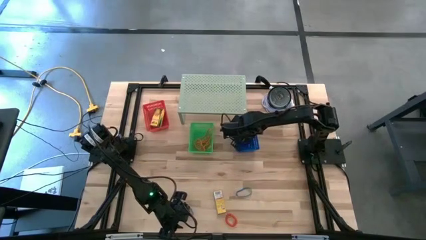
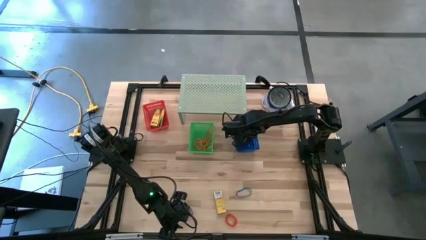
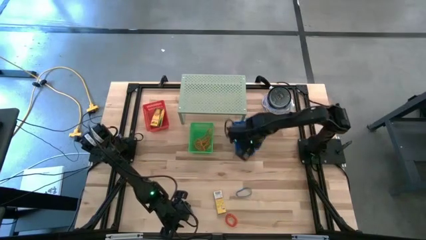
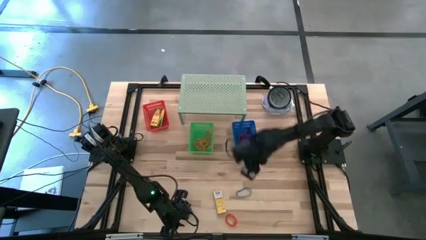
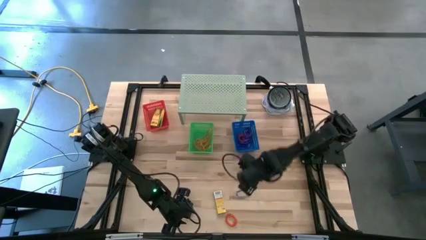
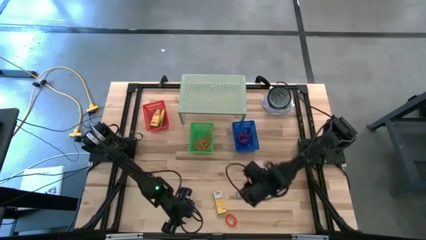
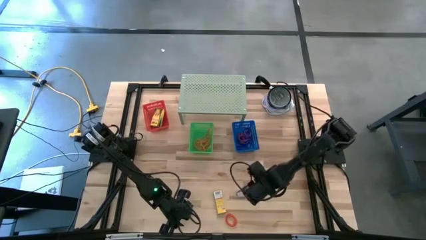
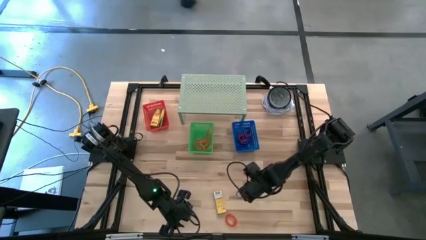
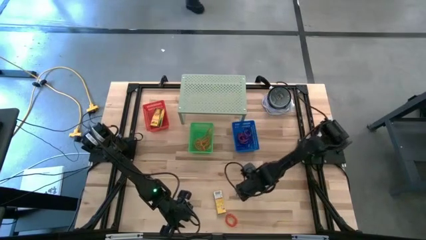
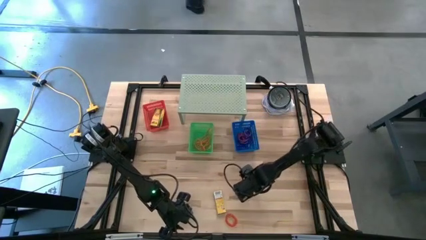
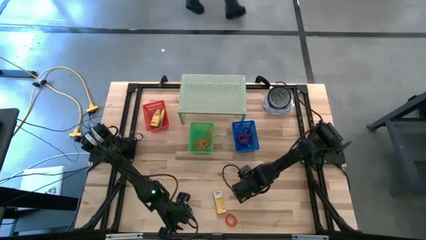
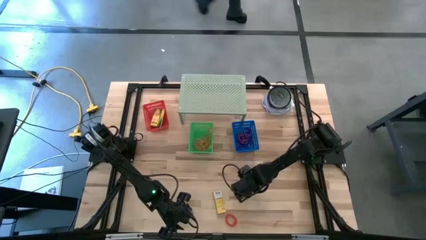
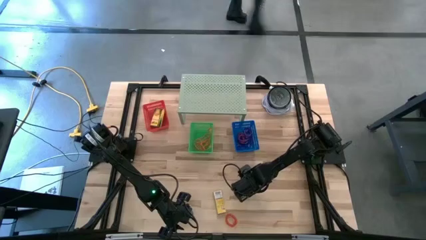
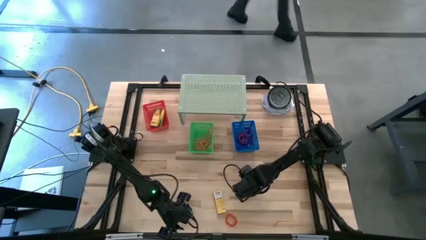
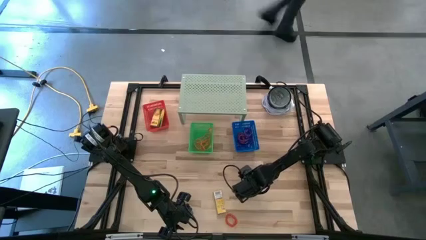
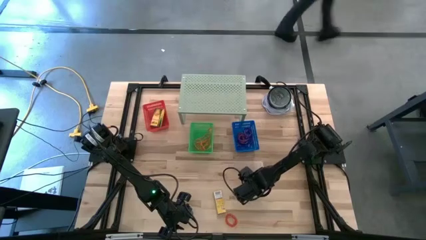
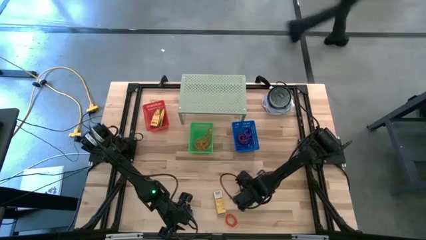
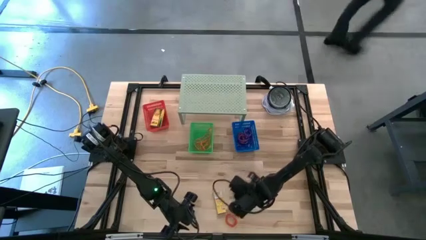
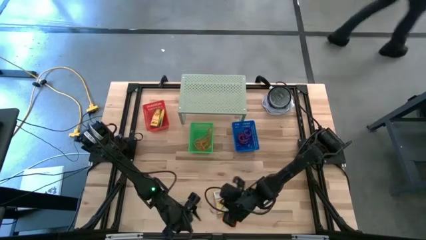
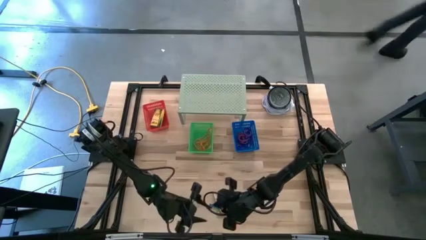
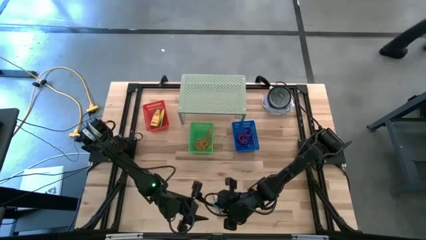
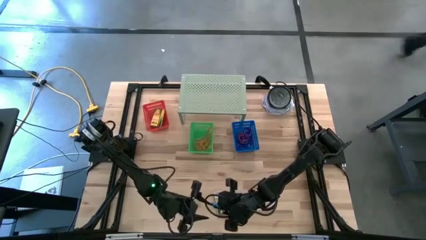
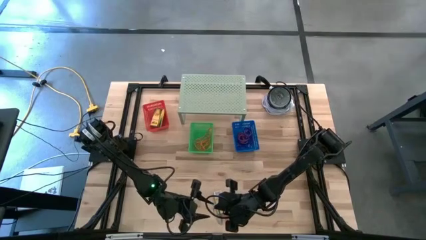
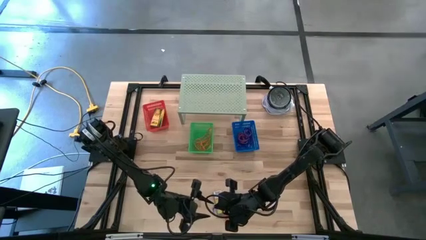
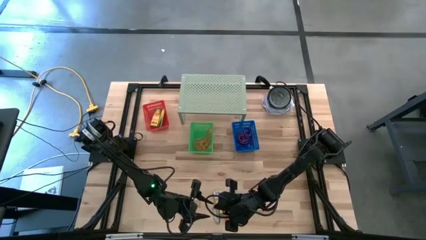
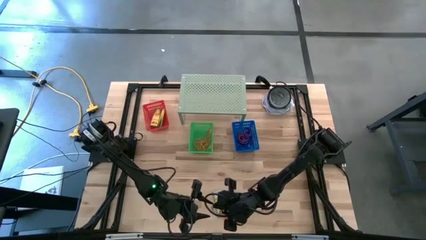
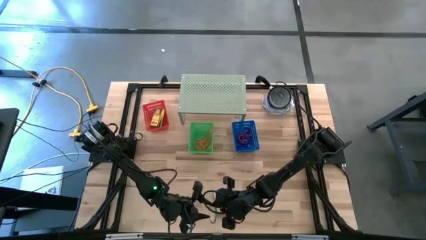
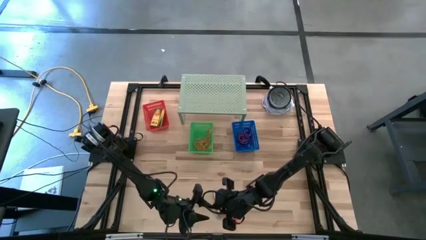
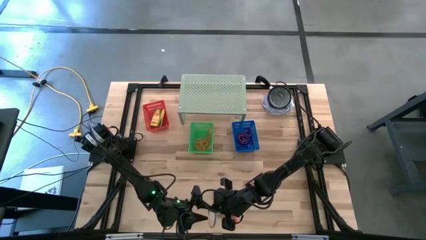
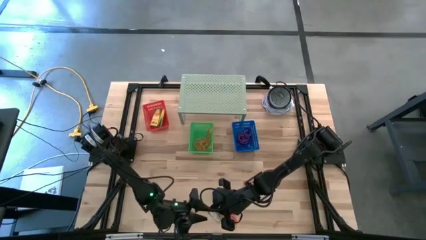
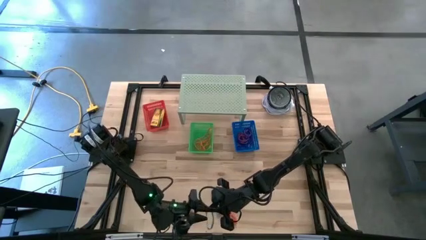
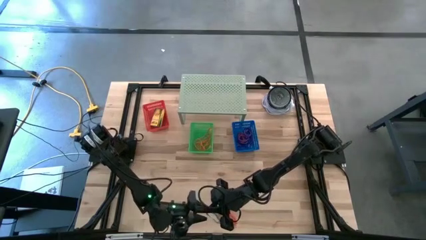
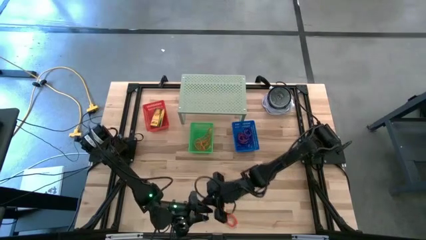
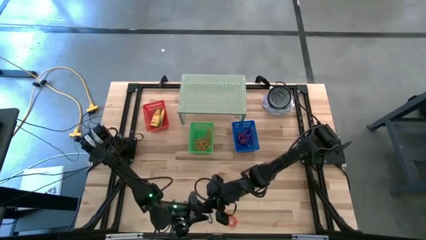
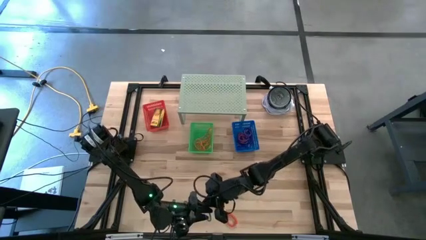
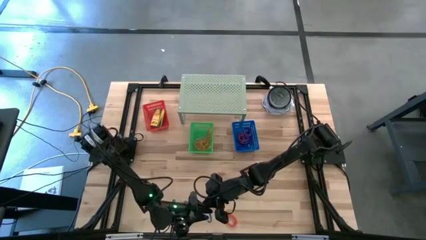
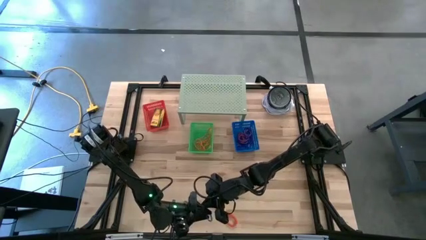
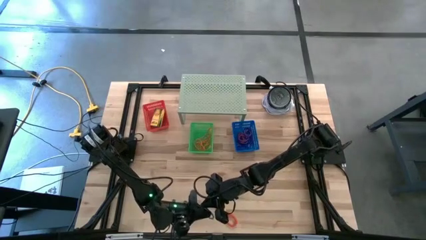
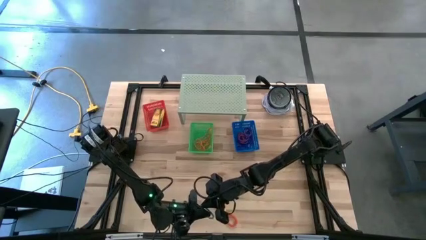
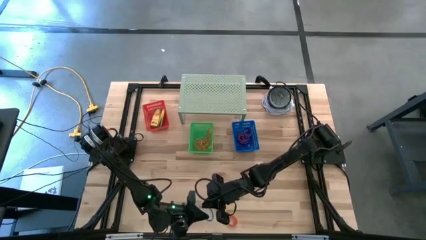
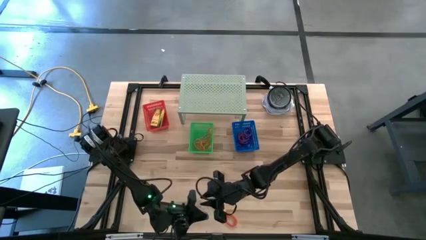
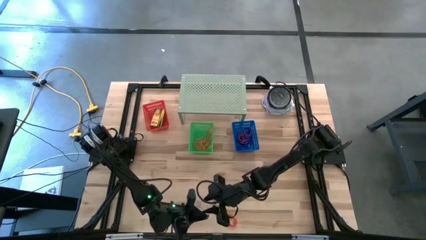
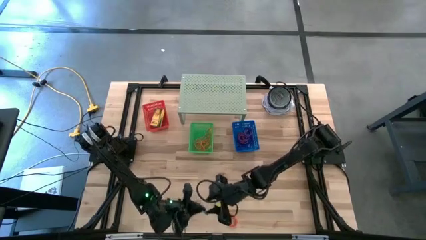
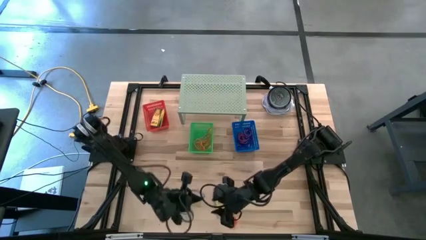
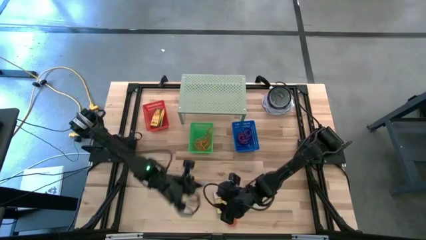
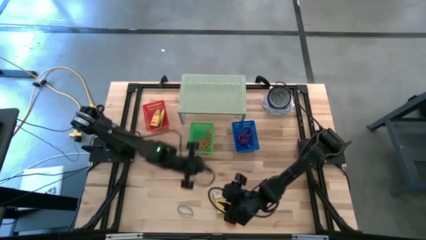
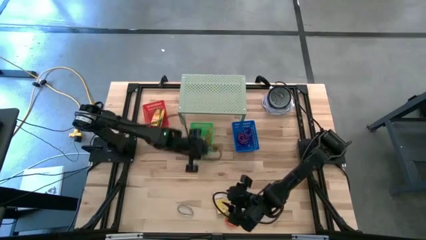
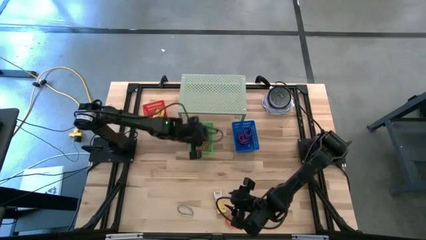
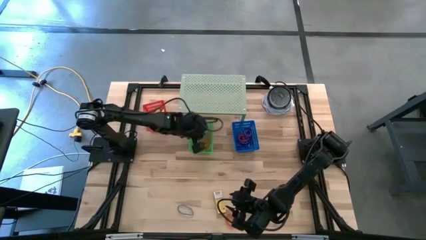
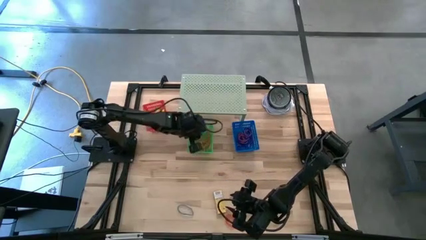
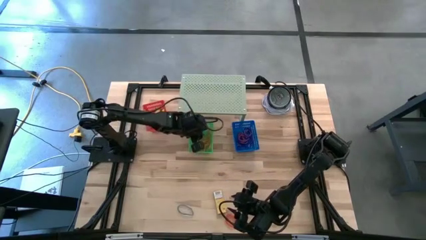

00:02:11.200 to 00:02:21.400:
Task: Pick & Place Office Desk Supplies
Put the blue rubber band into the green bin

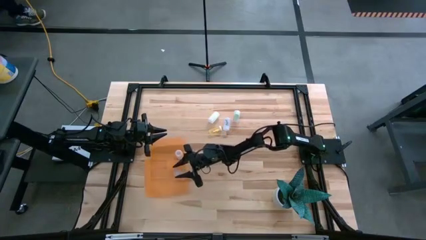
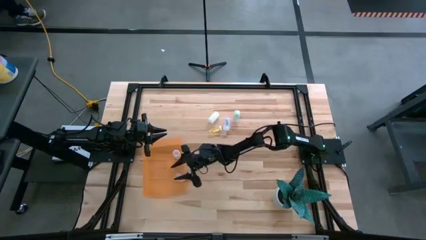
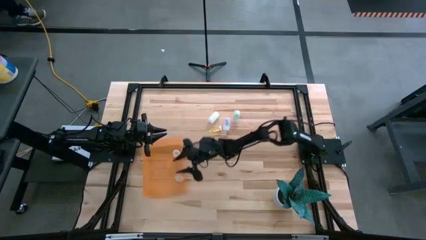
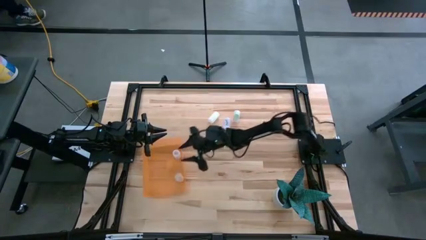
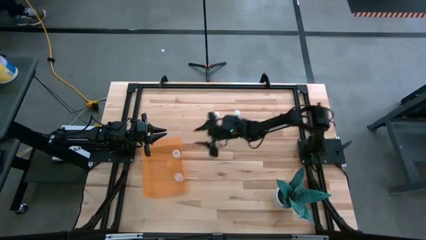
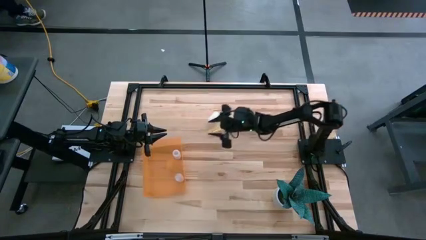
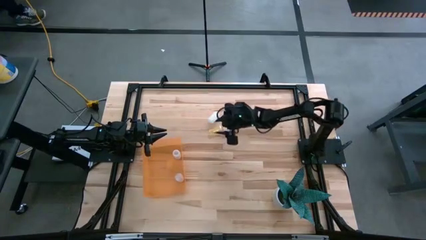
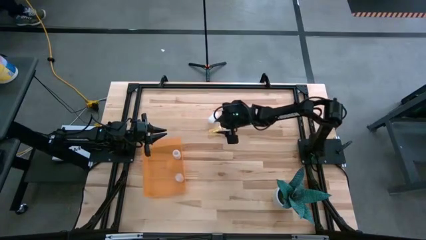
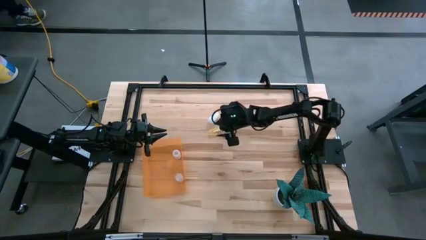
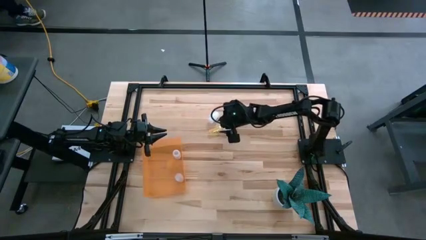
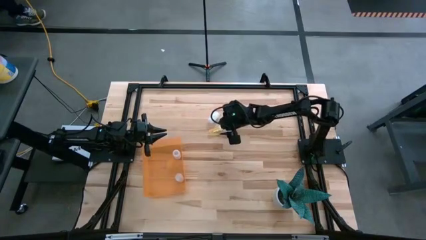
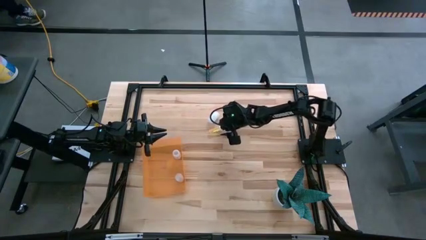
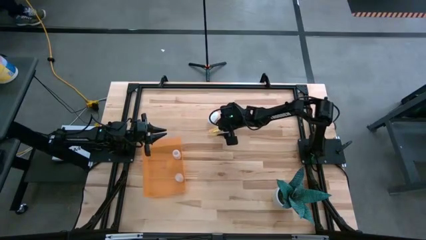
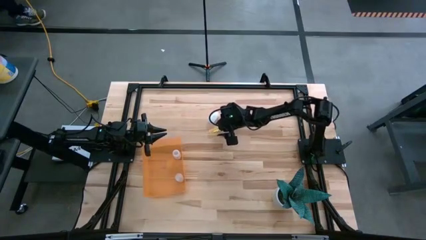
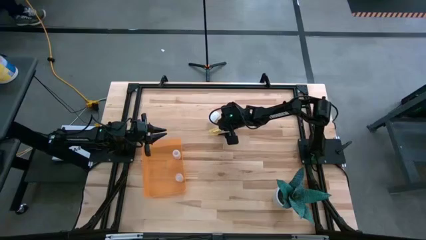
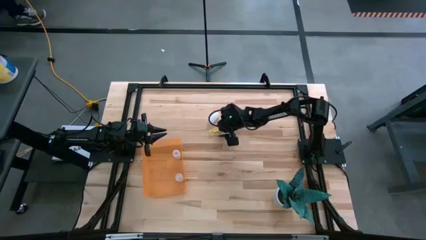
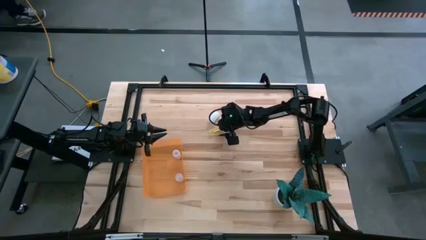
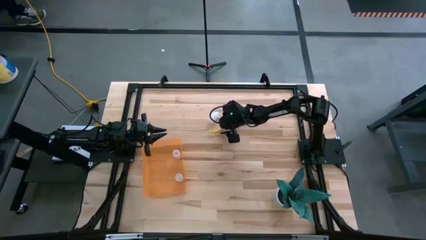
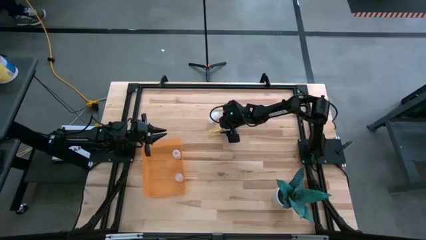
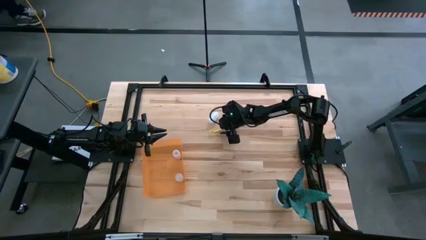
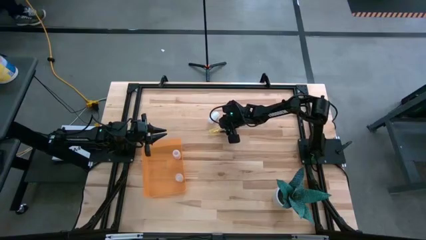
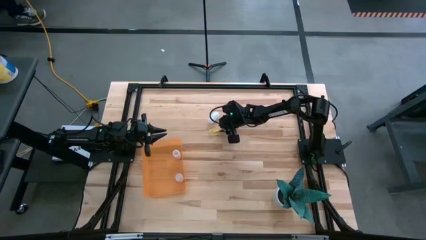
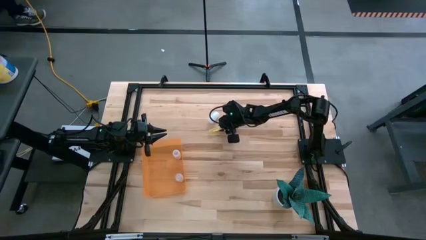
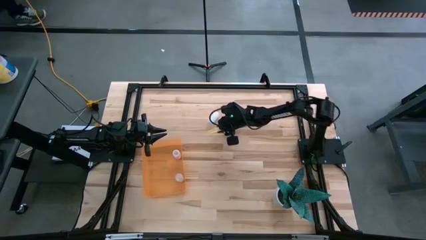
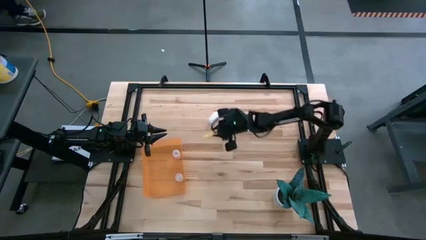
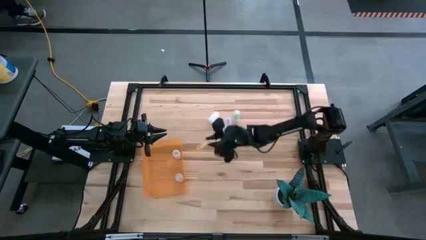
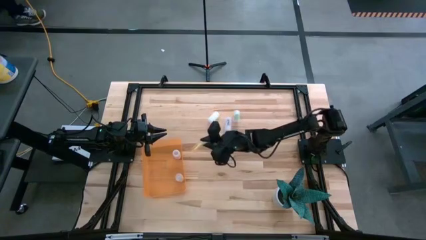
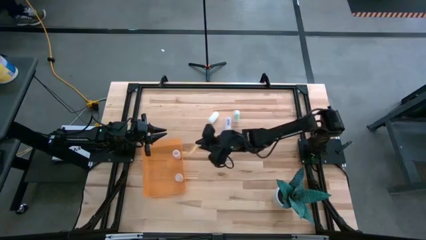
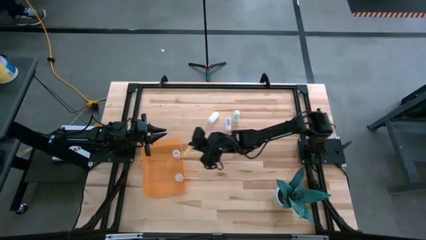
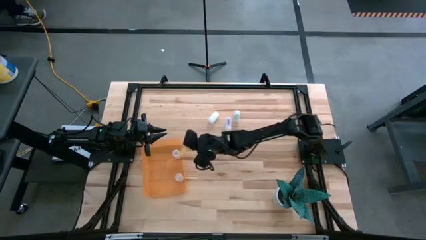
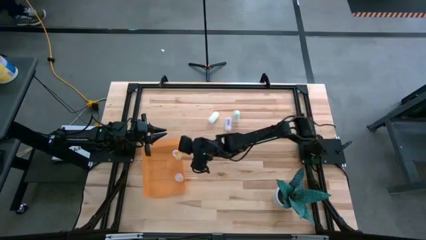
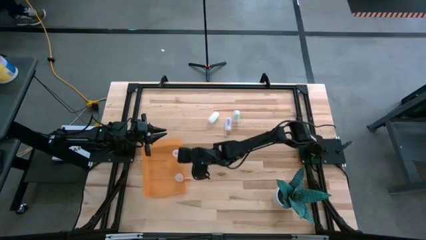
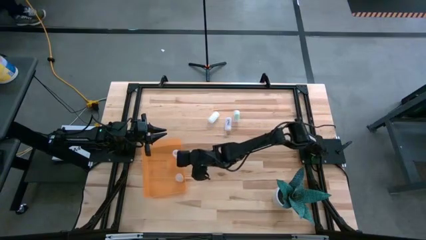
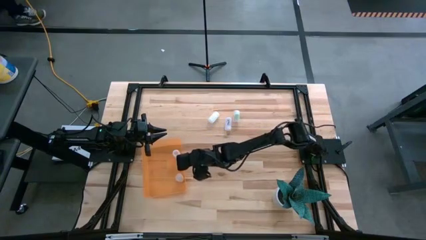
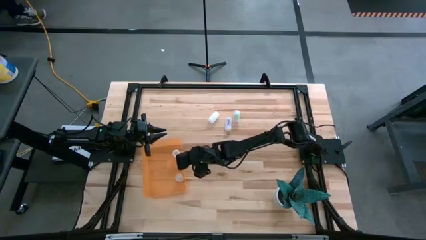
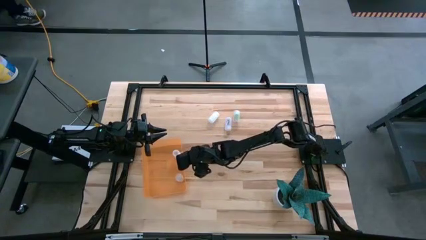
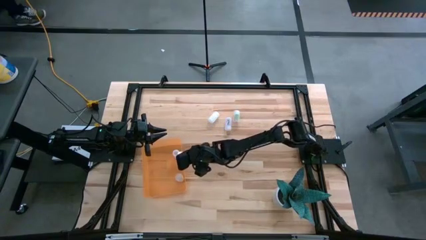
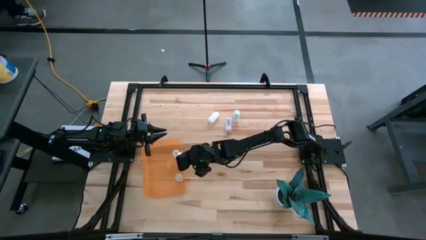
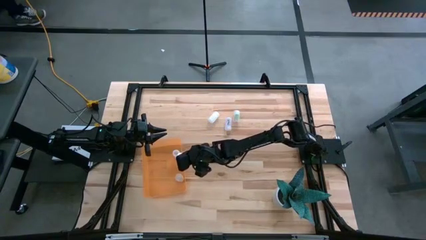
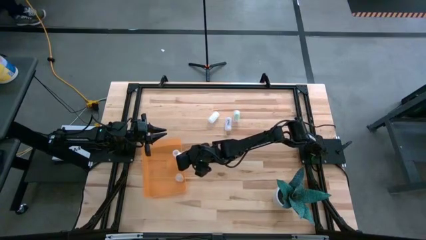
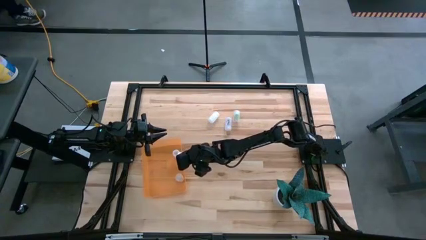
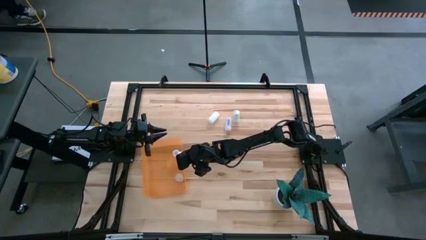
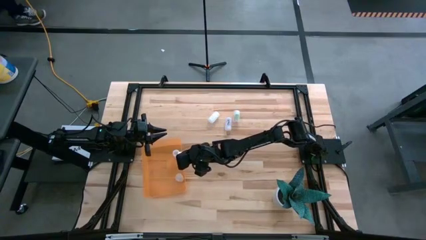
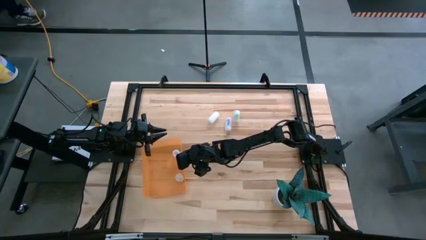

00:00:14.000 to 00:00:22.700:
Task: Pick and place pill bottles into a basket
Put the yellow pill bottle into the orange bin
